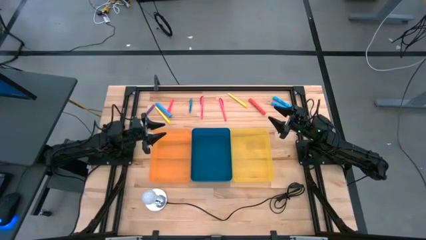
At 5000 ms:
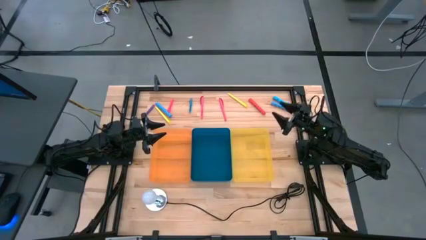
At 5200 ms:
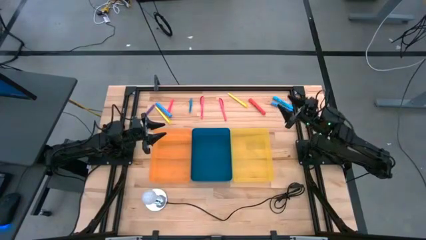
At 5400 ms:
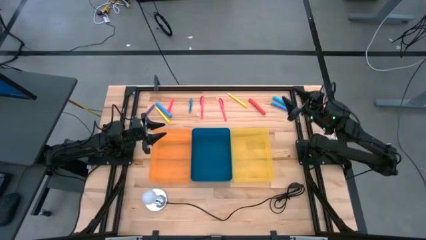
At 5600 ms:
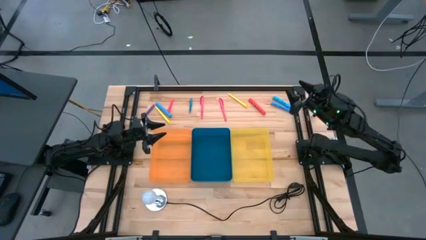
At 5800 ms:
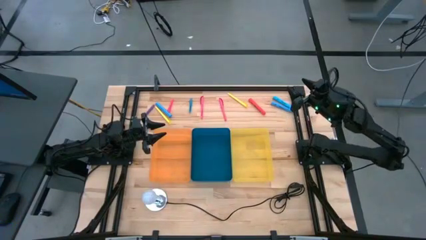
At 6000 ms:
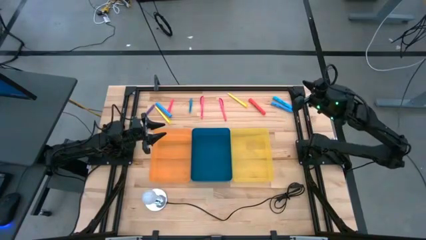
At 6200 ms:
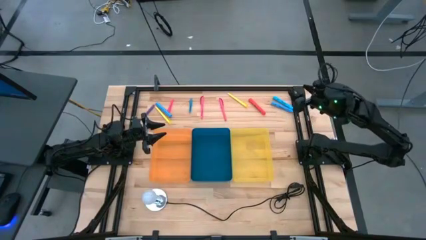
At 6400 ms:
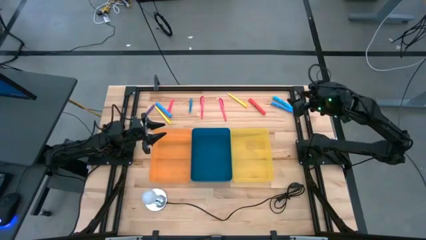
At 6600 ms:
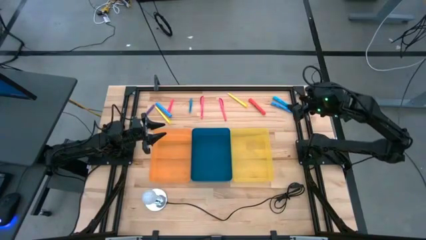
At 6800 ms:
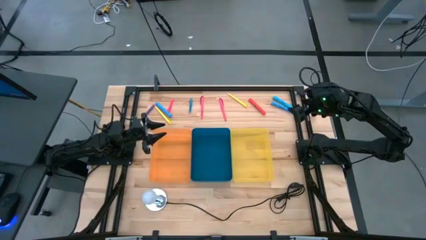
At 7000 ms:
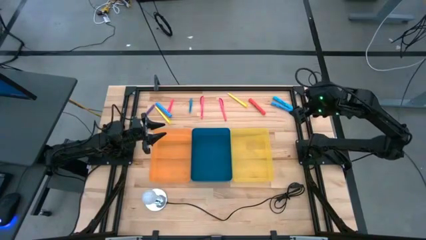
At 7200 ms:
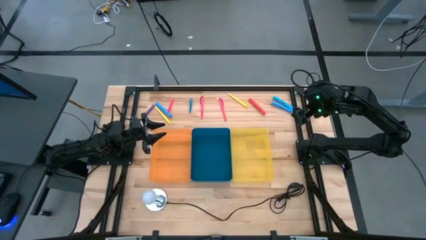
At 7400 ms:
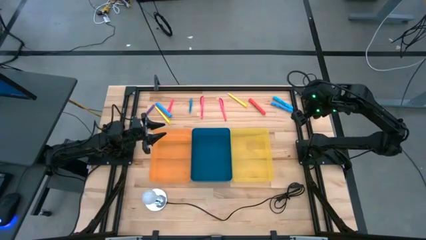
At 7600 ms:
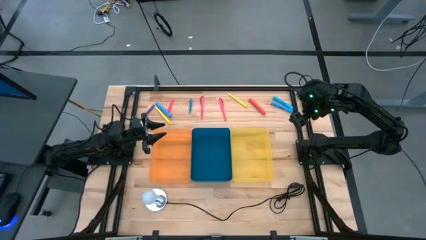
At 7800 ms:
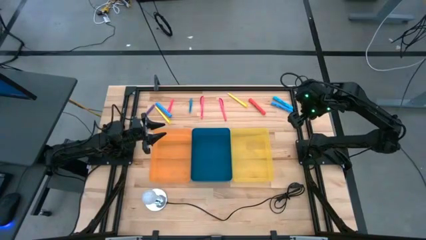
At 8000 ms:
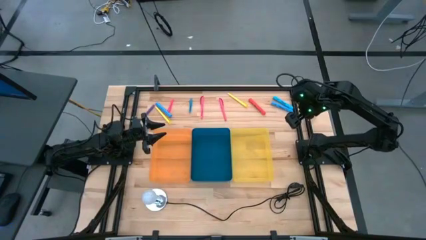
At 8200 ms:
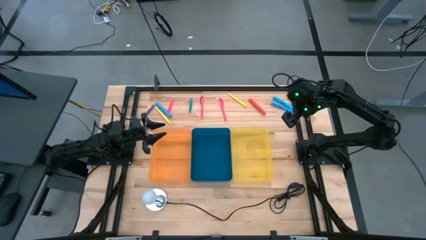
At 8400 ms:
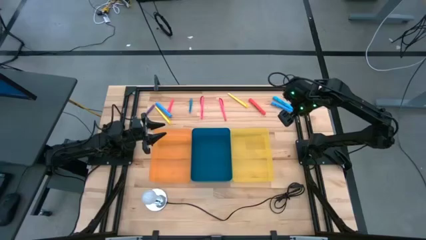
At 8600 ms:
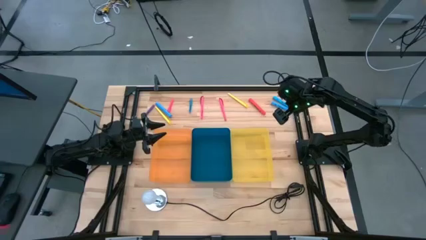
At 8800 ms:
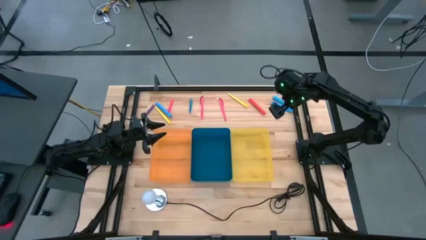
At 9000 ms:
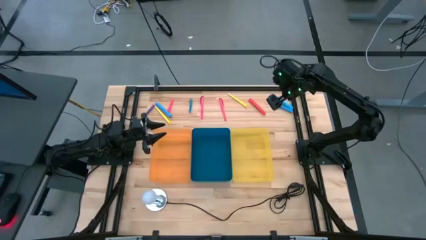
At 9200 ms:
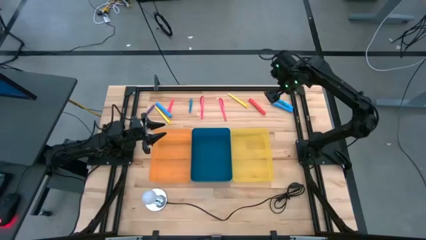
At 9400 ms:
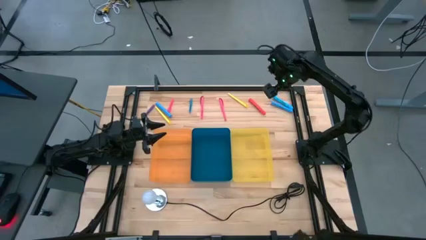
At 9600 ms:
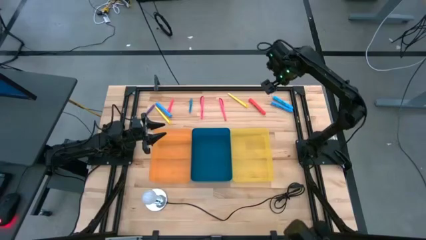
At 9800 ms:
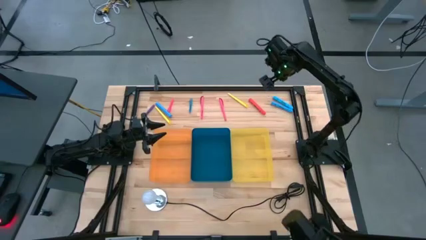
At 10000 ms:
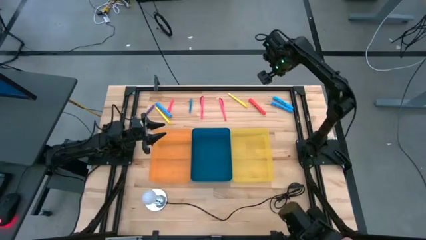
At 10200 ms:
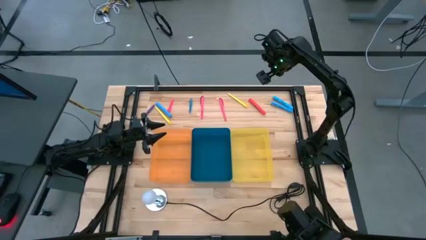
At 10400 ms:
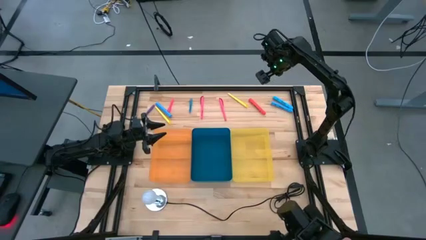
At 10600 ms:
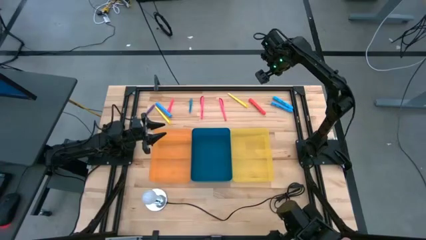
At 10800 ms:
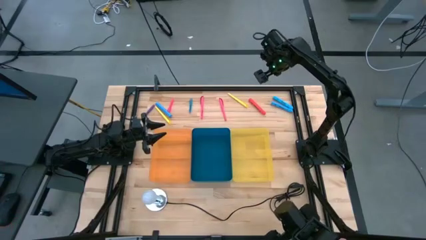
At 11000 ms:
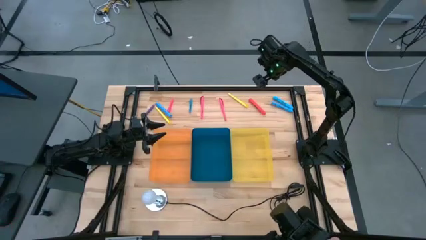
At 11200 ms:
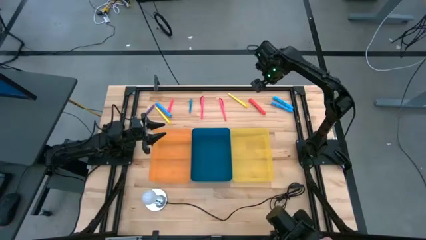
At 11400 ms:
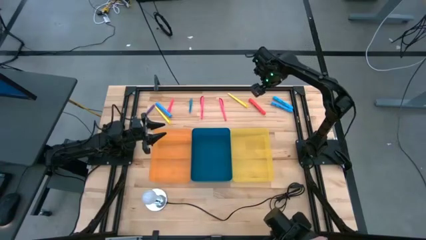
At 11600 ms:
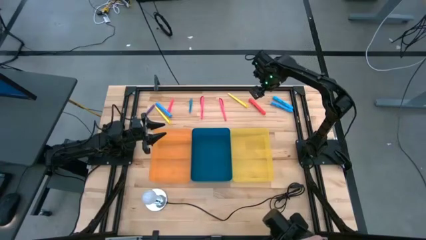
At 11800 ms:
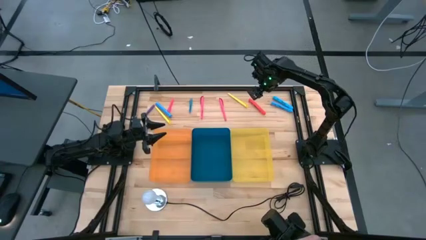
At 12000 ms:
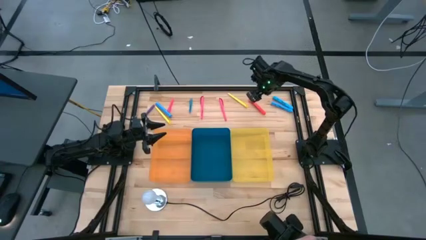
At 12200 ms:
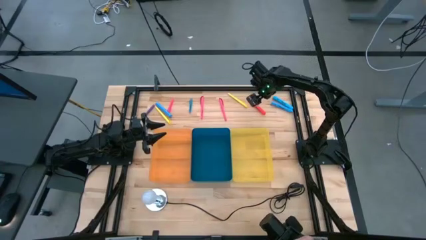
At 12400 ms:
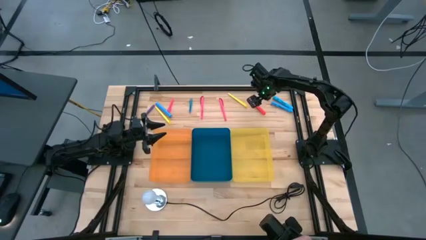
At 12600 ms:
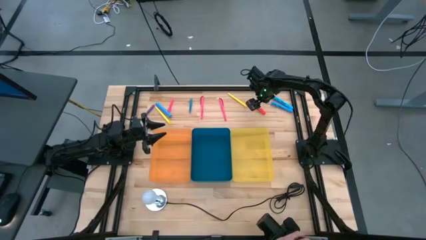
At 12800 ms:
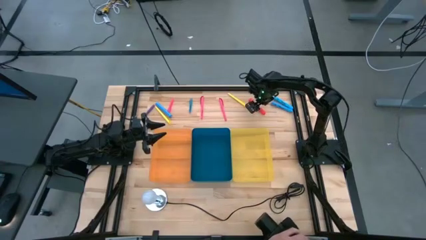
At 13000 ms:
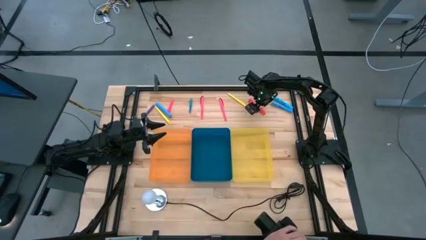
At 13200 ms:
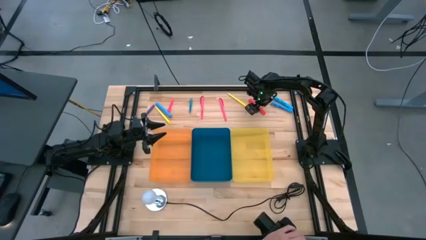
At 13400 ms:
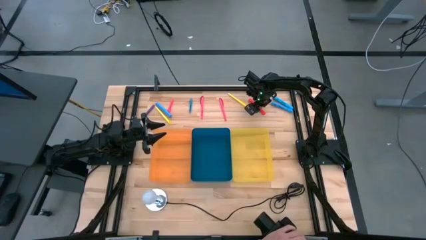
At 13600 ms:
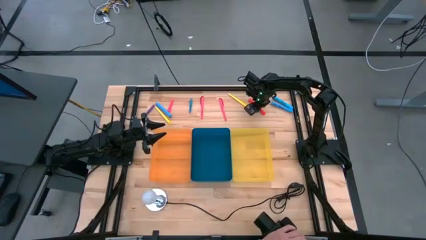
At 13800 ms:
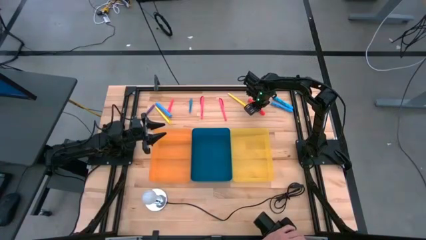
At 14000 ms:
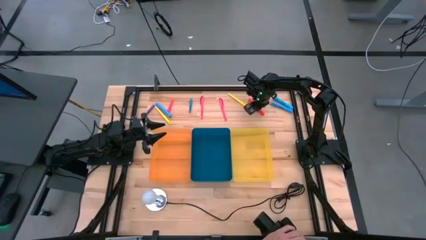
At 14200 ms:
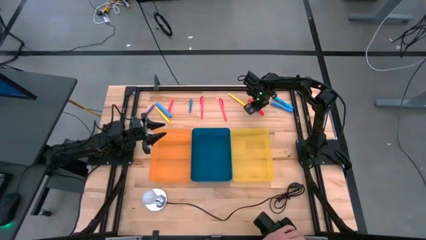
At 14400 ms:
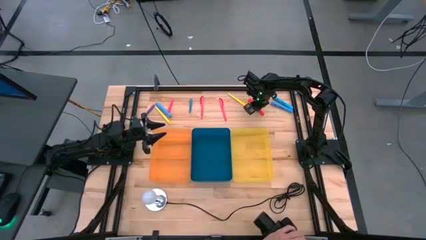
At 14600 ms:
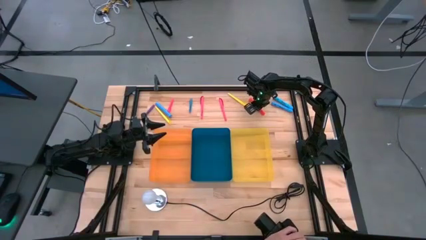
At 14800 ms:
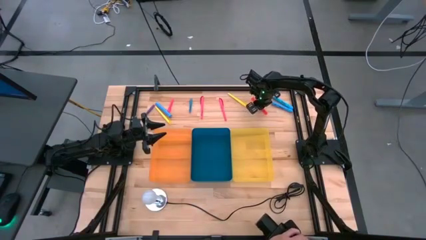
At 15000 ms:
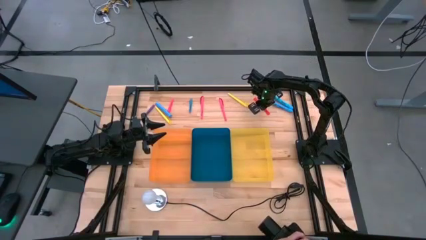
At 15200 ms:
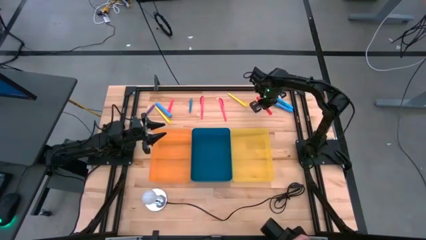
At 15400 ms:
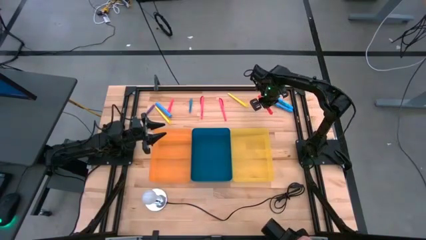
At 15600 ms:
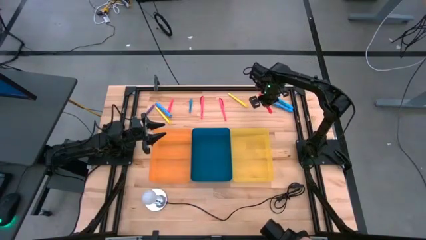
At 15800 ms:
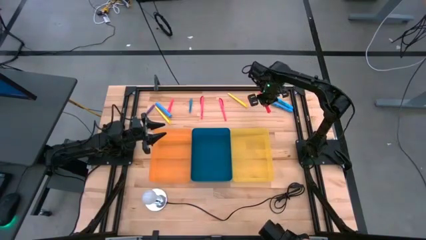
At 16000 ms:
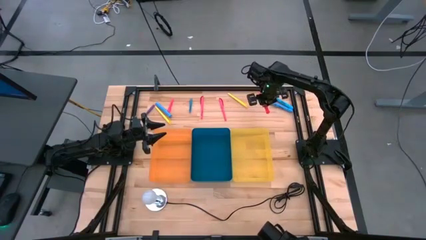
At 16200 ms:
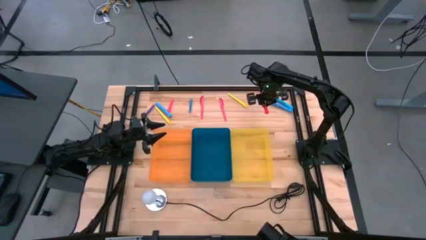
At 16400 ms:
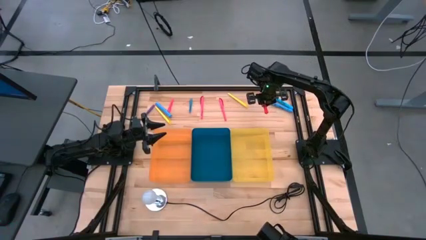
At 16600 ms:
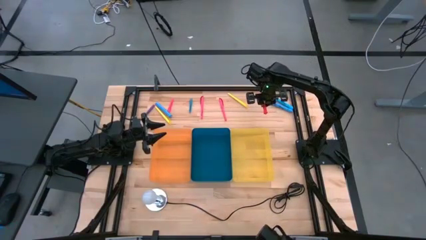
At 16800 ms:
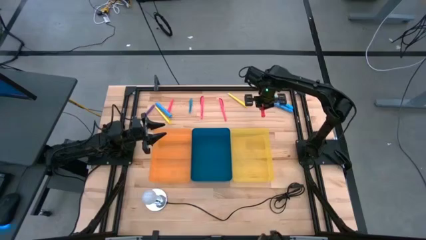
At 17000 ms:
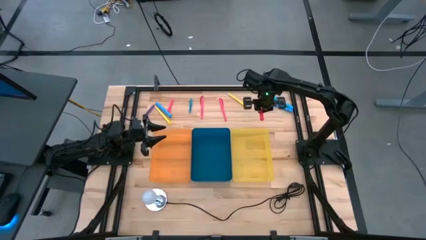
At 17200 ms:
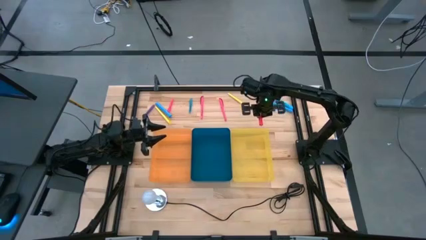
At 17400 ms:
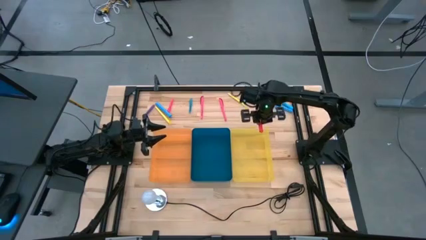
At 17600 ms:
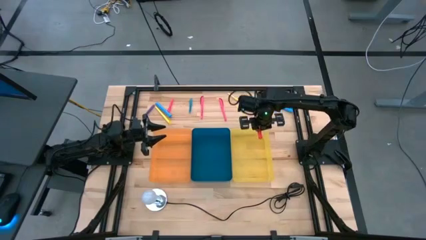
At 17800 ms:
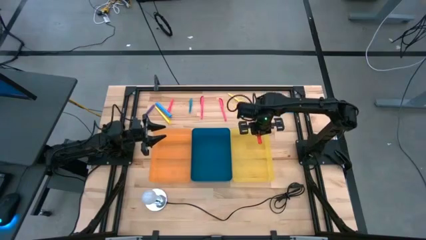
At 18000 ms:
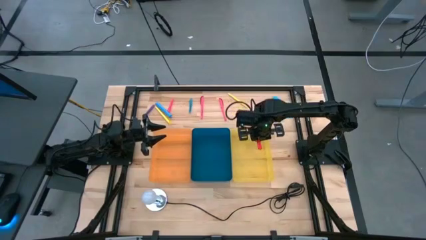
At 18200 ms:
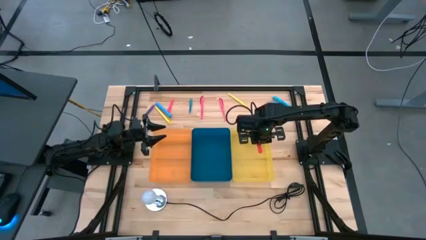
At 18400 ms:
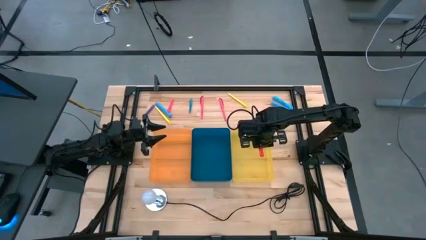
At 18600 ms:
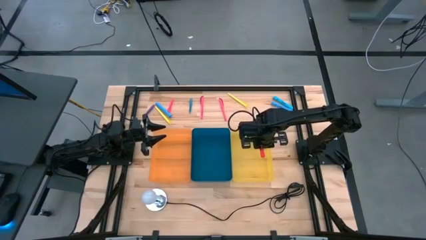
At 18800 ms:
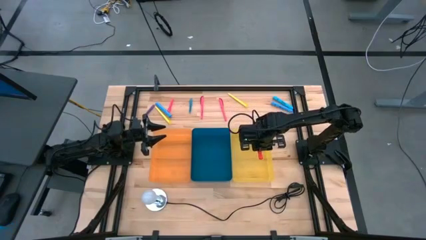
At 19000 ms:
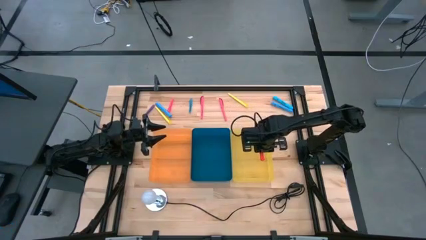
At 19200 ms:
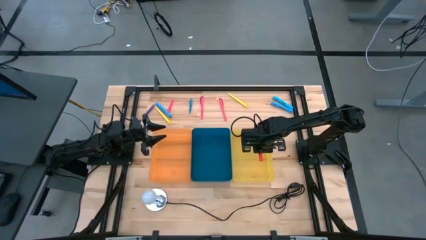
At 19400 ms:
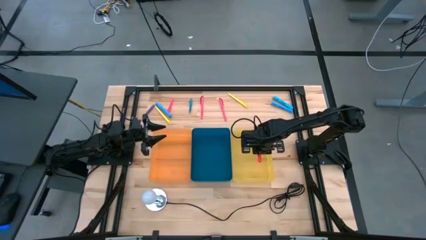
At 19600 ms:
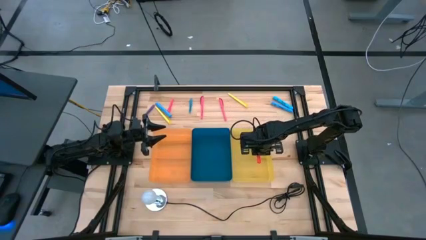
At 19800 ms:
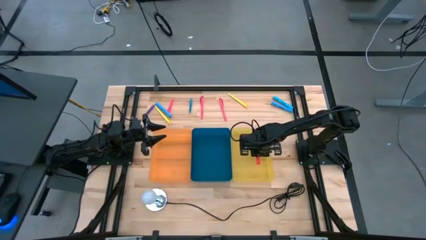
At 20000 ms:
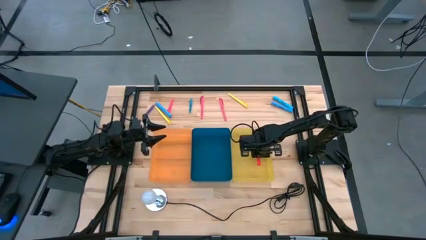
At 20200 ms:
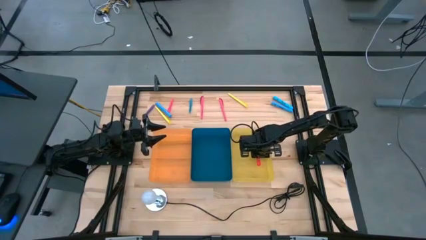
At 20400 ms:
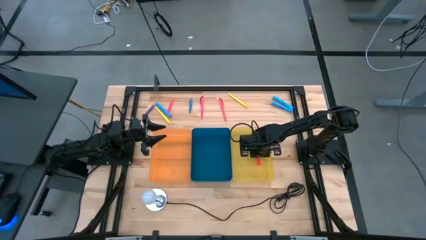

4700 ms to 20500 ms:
Task: Pick & Place Markers
Put the orange marker into the yellow bin
